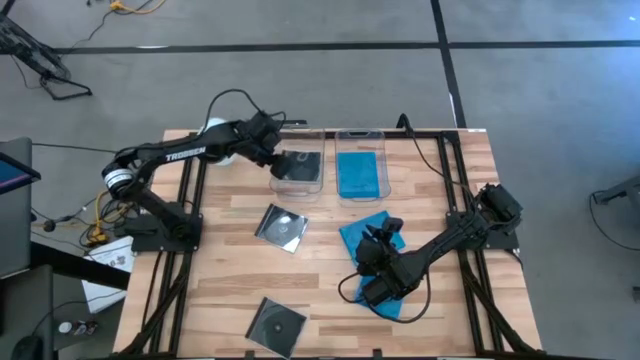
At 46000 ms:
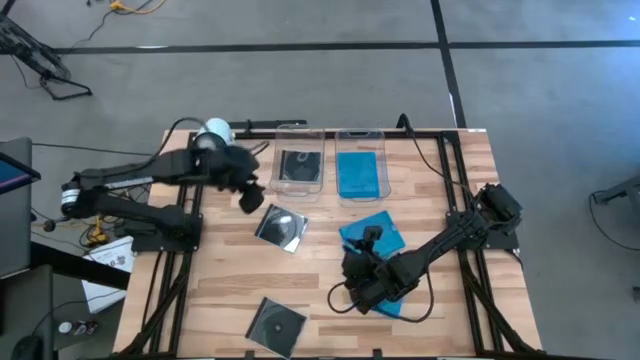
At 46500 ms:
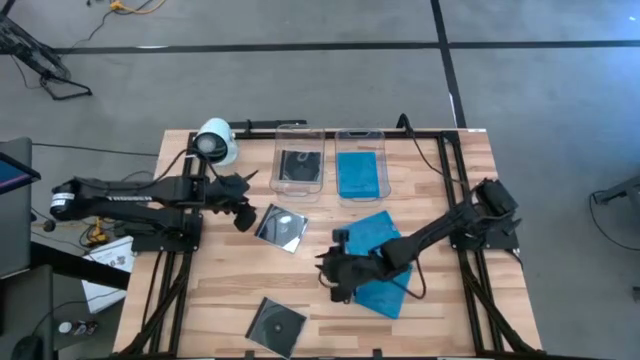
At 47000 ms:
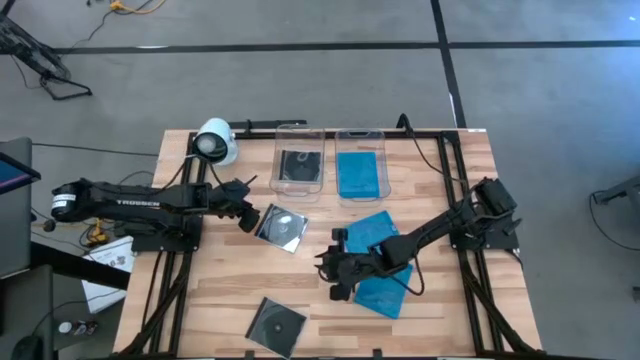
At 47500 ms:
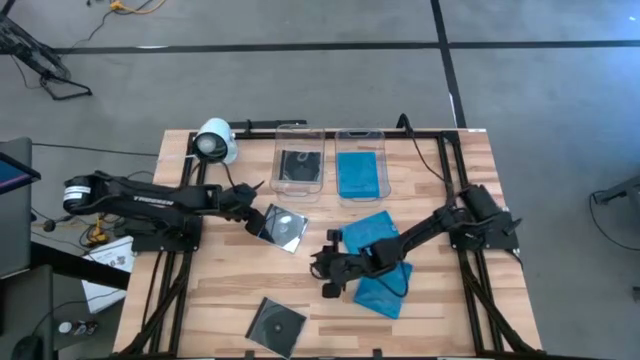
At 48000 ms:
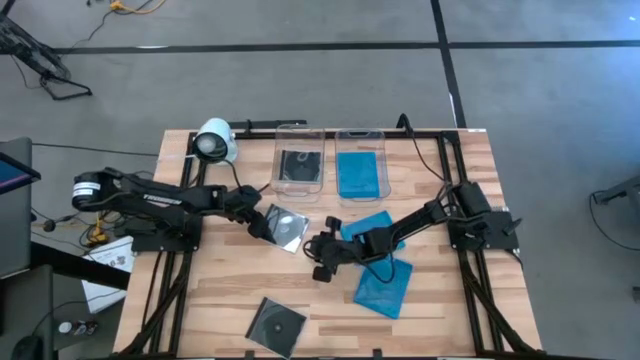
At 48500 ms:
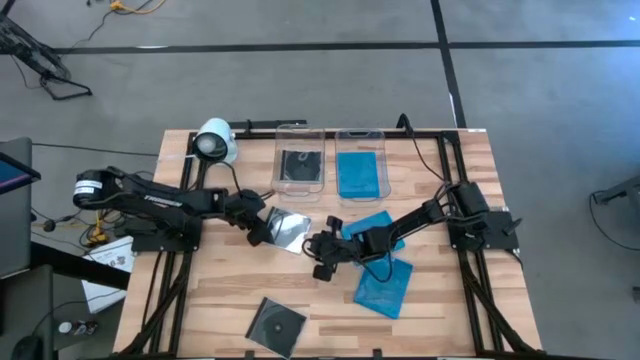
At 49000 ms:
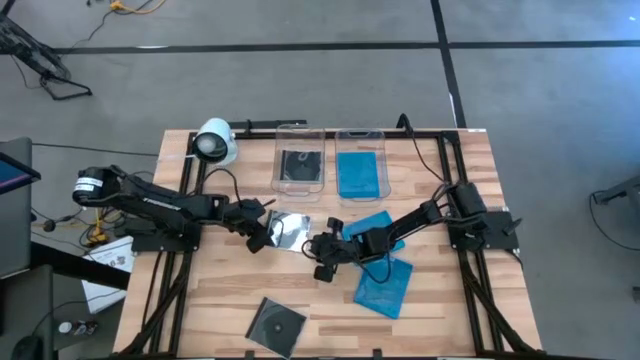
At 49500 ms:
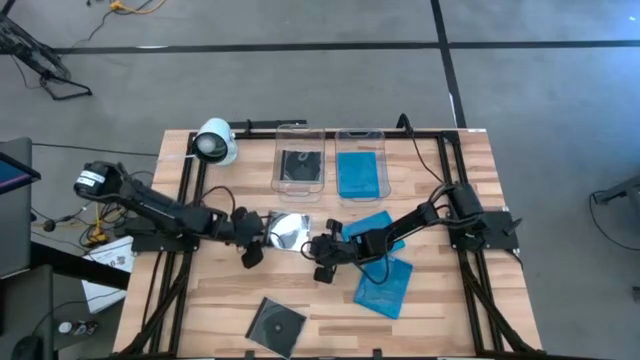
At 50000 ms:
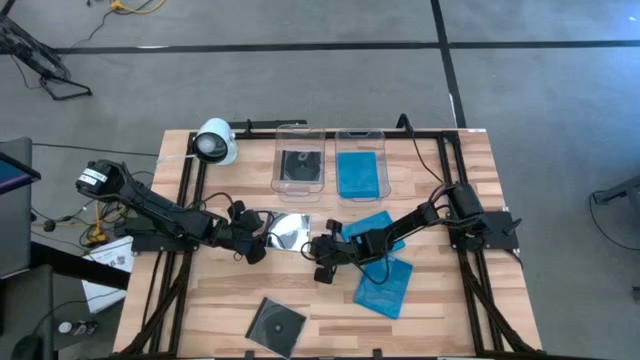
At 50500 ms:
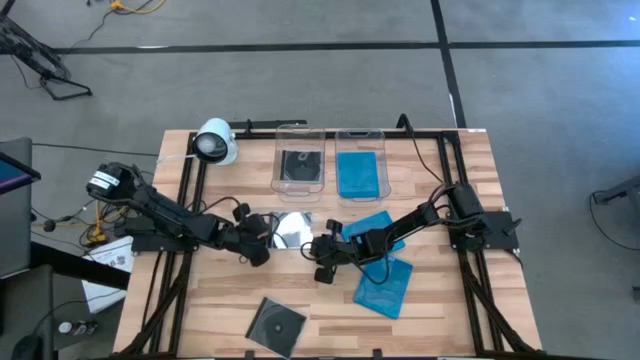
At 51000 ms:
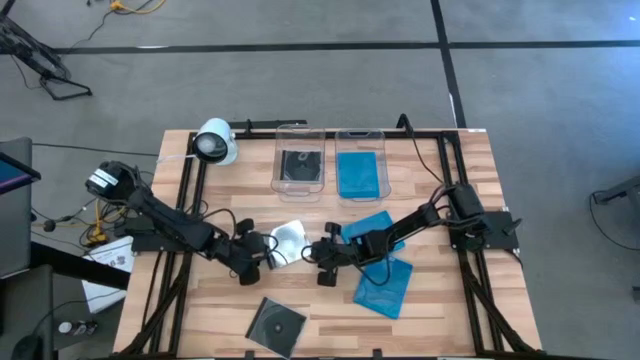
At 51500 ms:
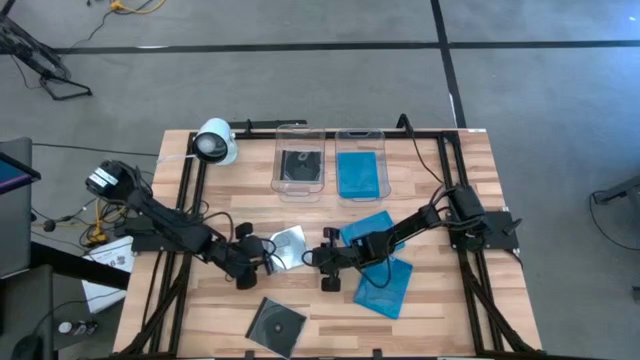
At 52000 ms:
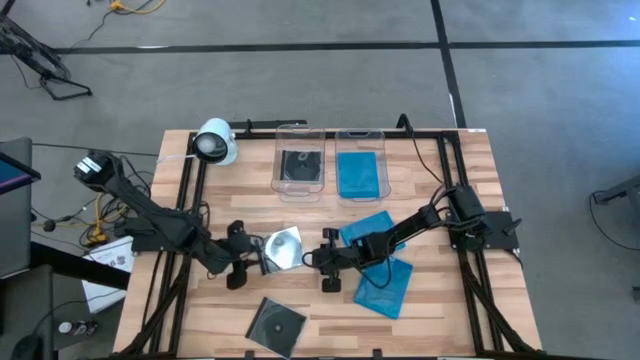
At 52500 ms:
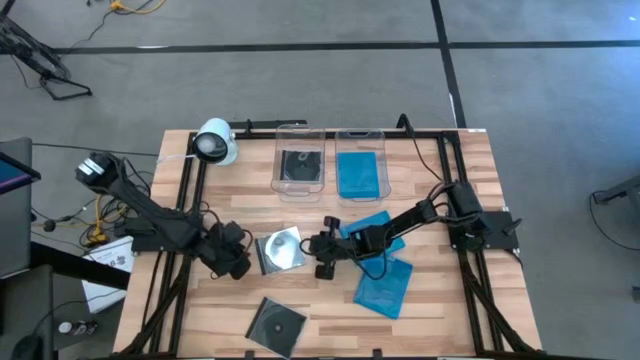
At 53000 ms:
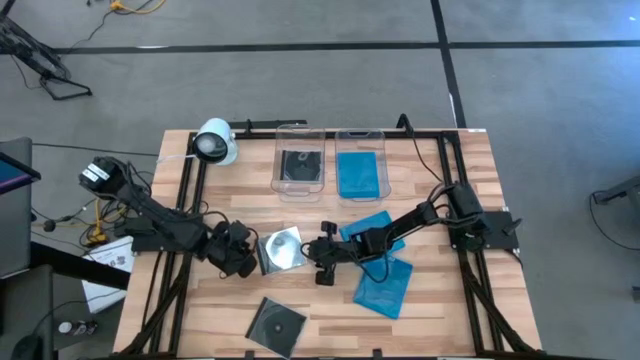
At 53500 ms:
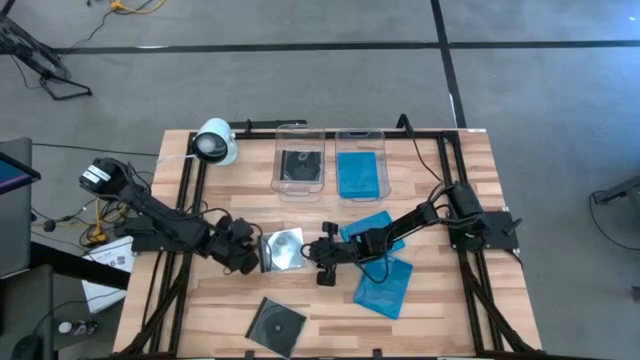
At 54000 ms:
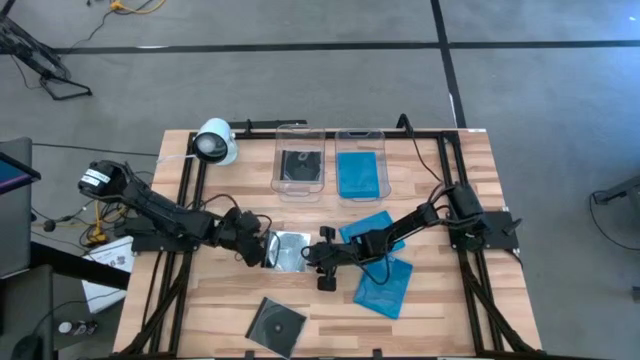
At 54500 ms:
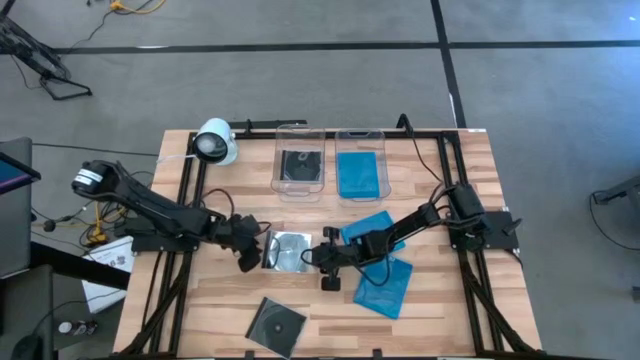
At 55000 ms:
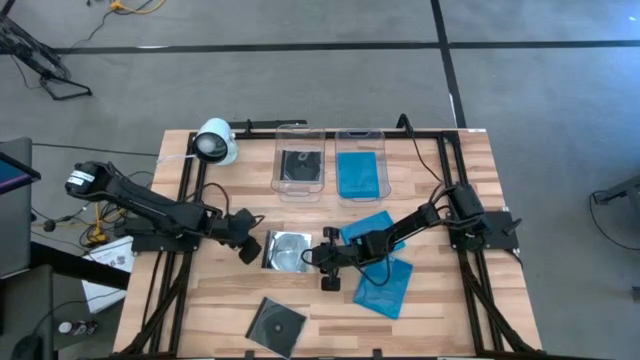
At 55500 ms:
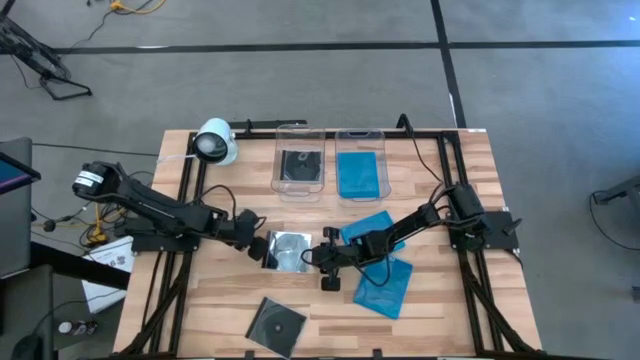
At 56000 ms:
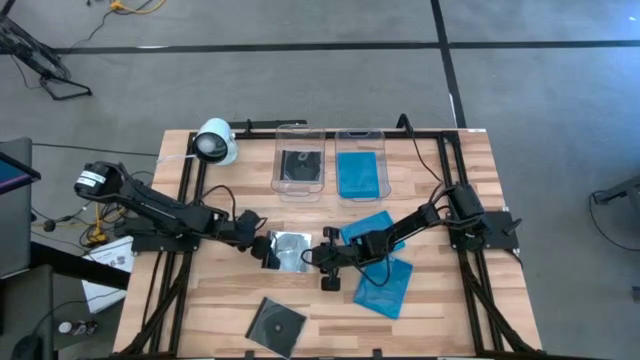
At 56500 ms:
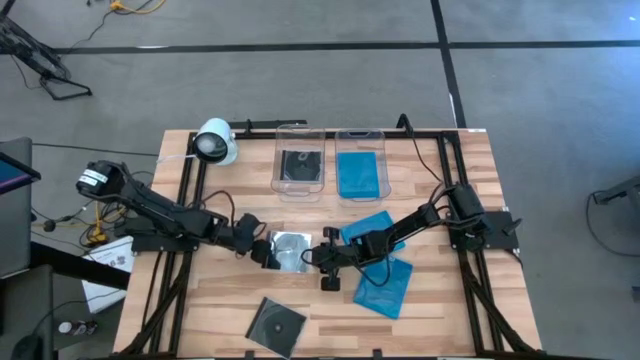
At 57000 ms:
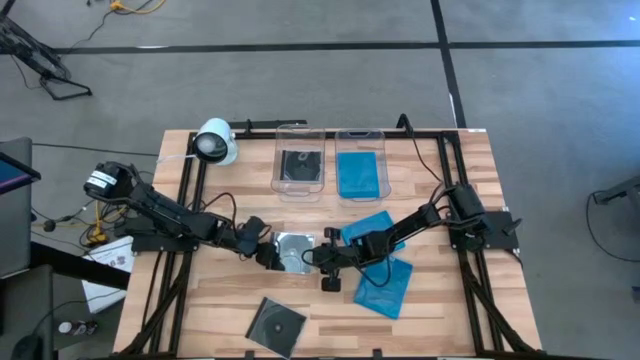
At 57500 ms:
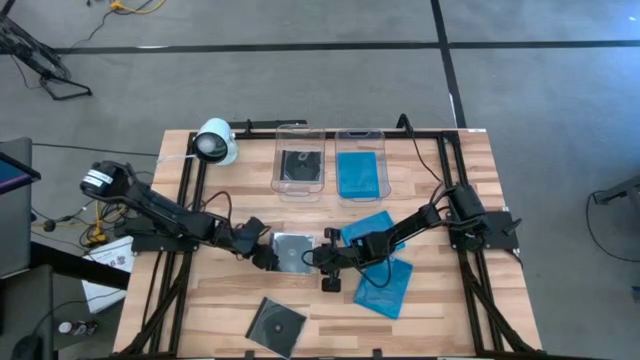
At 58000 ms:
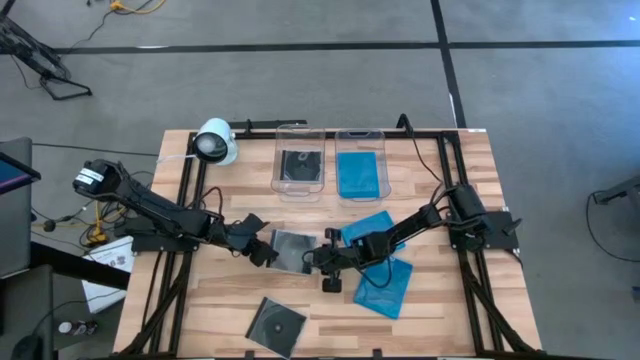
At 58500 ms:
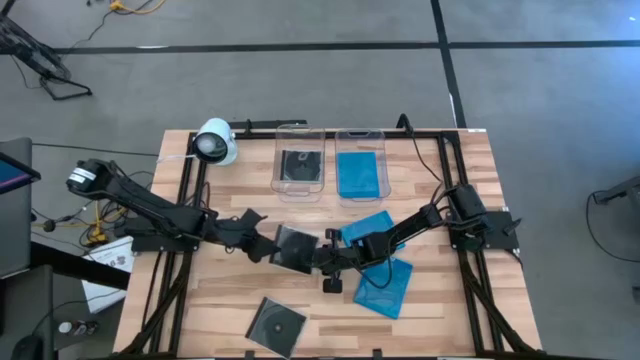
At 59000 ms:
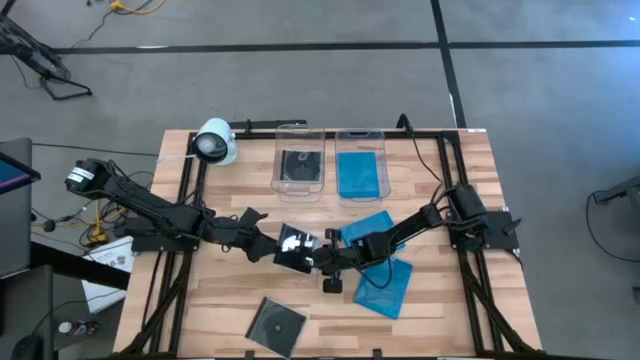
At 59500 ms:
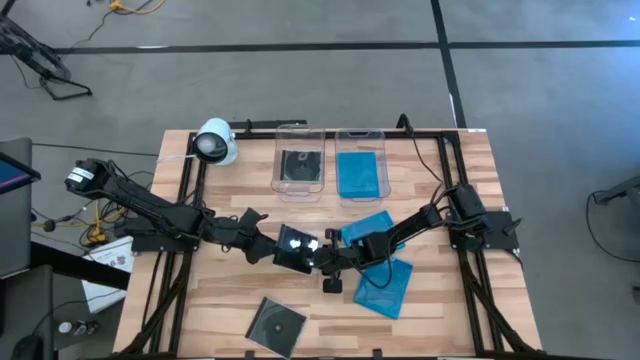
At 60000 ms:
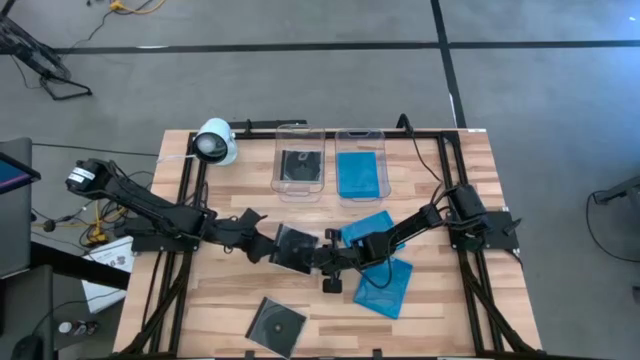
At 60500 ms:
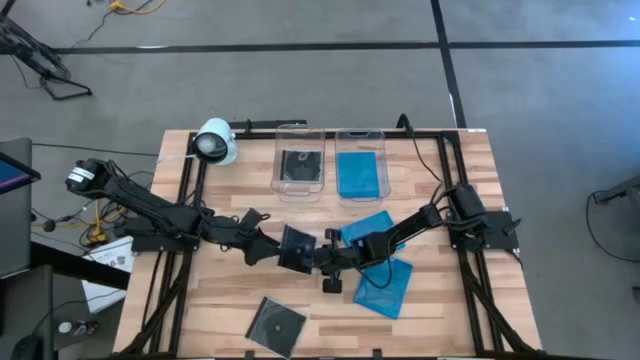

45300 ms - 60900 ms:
Task: Pick & place jewel cases by type
Put the top black CD case into the left transparent bin

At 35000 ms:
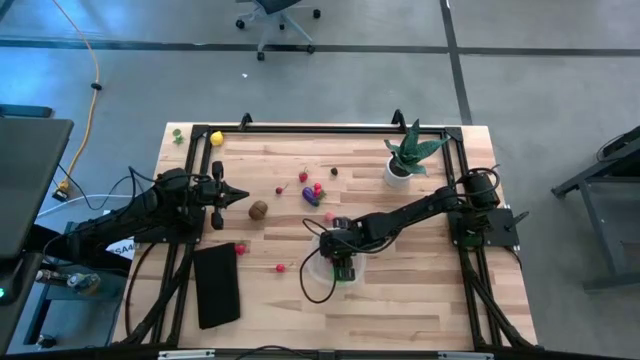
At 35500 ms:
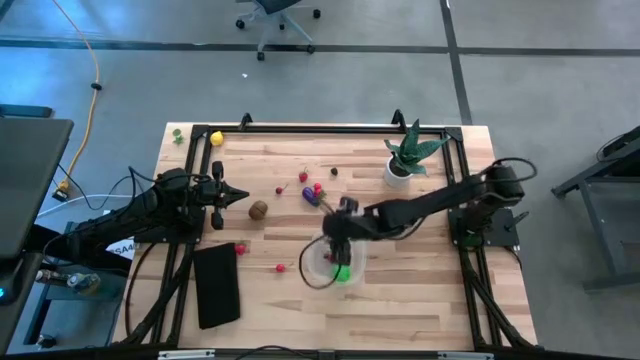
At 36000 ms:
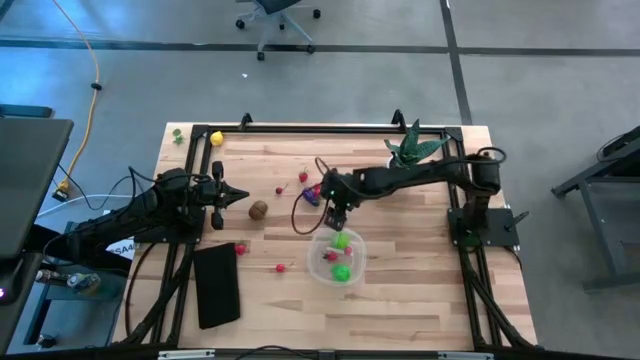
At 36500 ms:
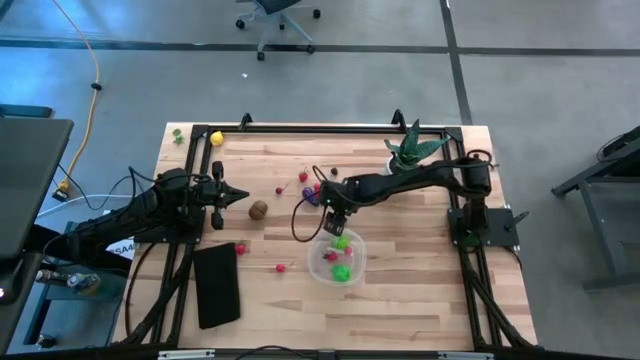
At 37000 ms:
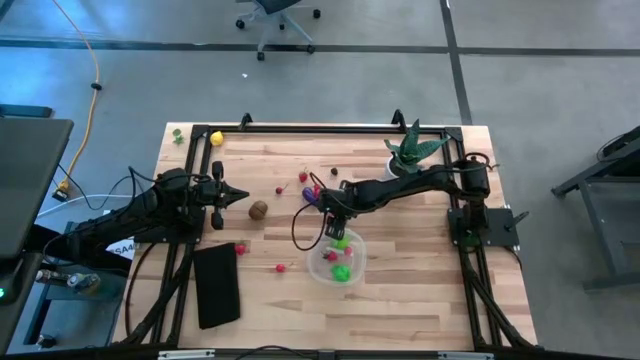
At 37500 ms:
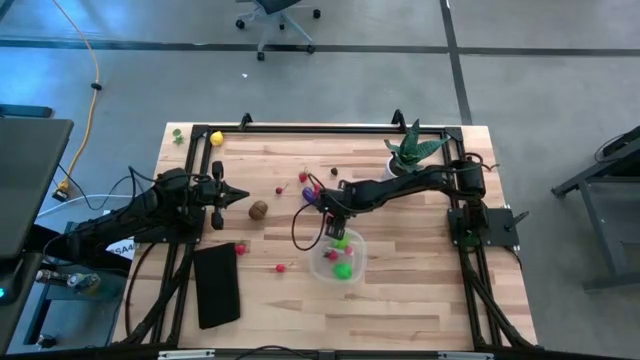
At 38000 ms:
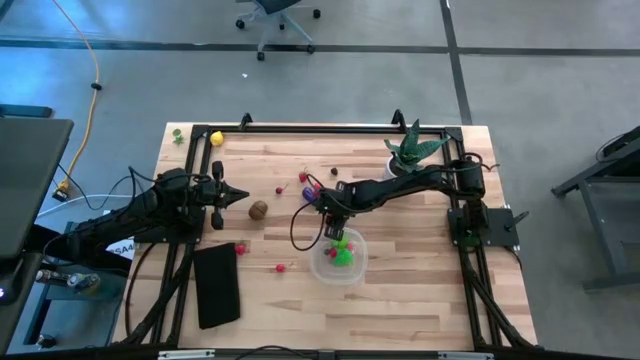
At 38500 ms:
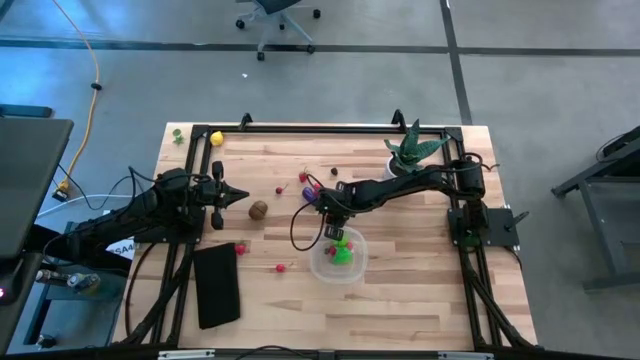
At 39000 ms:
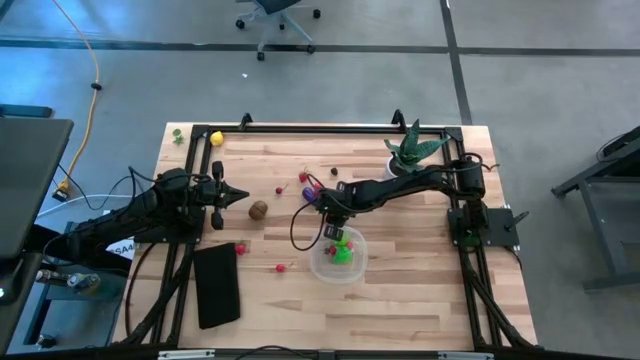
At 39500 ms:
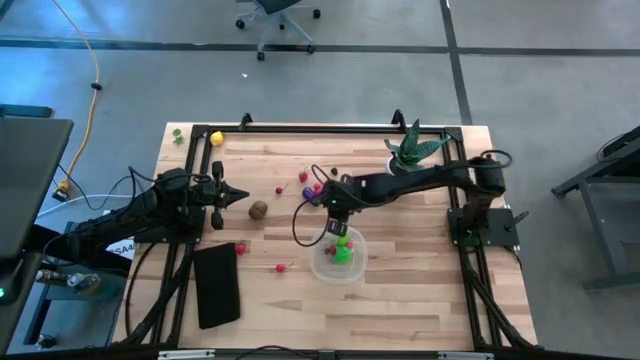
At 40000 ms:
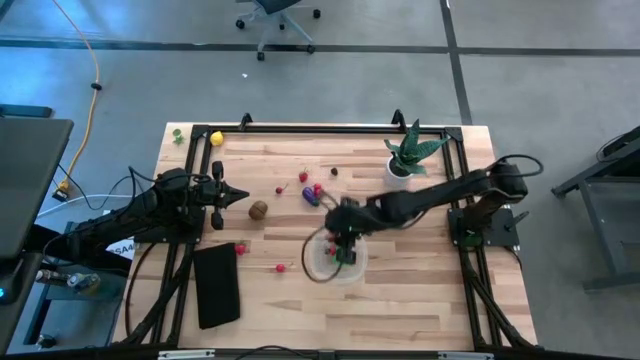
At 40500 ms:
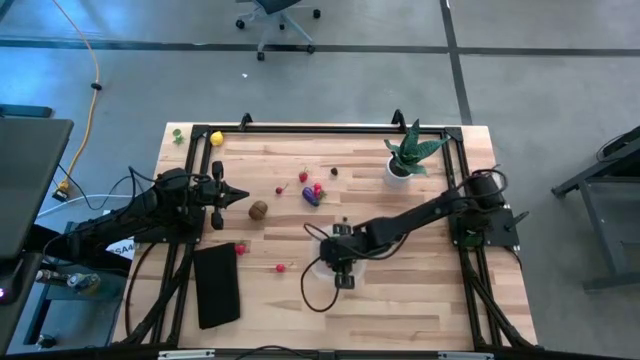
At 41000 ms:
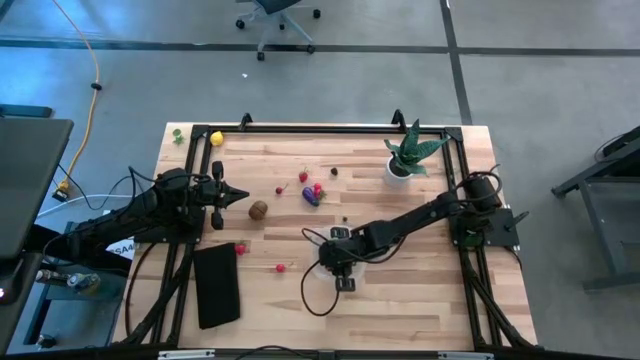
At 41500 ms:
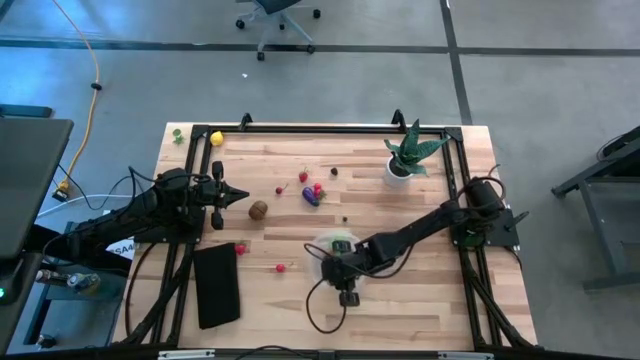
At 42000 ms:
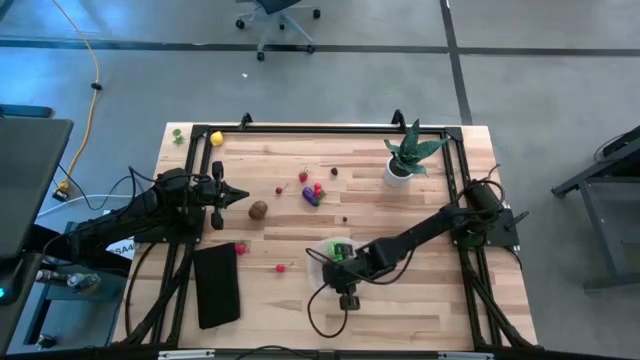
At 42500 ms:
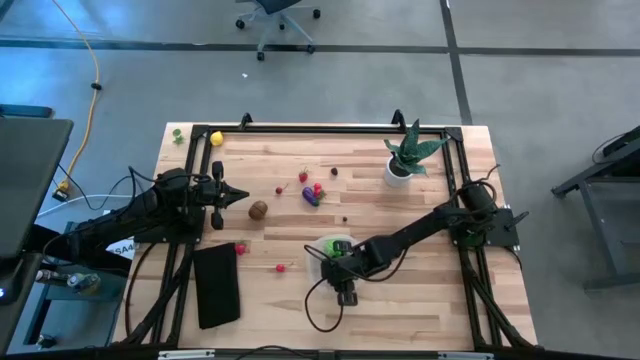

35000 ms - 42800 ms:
Task: Pick and placing Produce into tupperware
Put the pink peach into the transparent container
